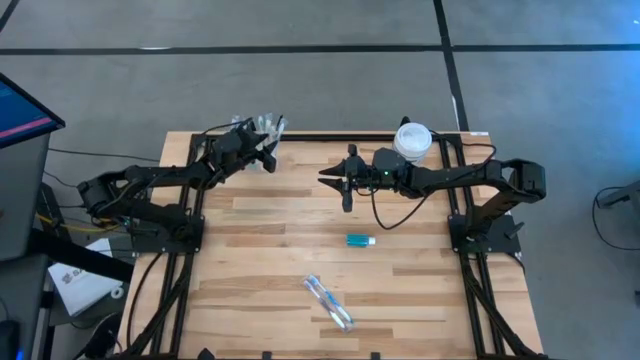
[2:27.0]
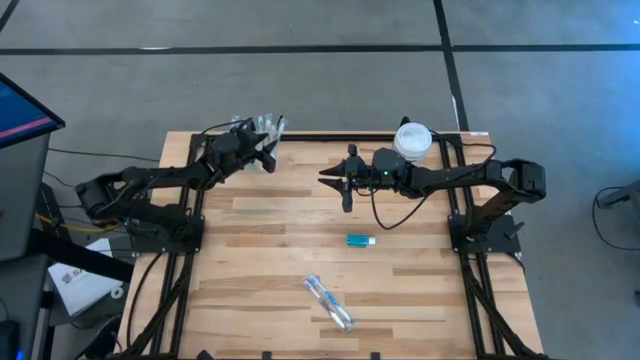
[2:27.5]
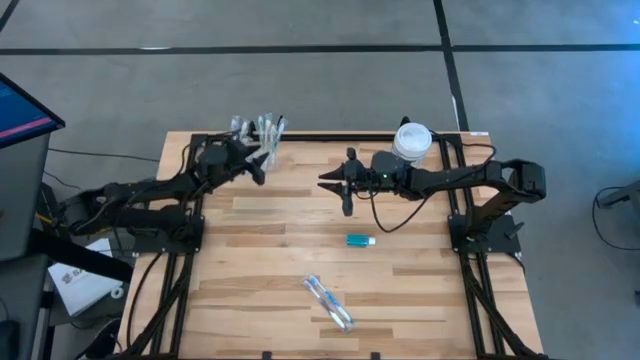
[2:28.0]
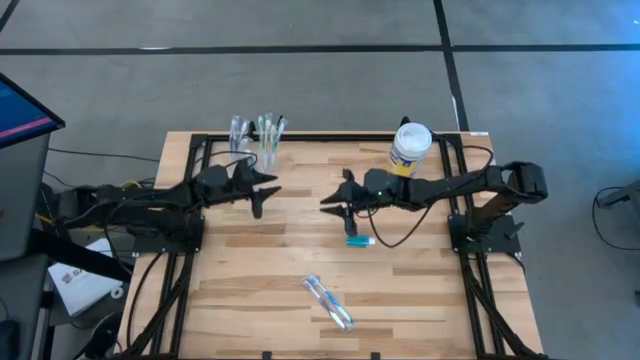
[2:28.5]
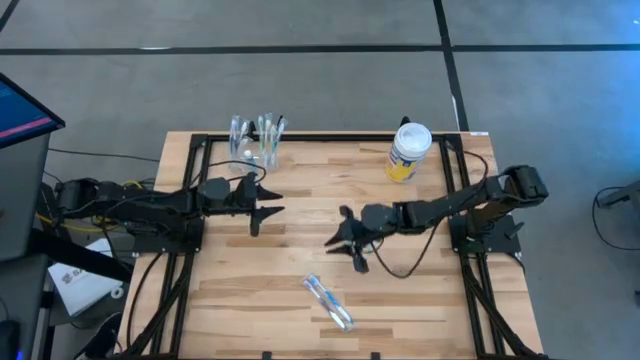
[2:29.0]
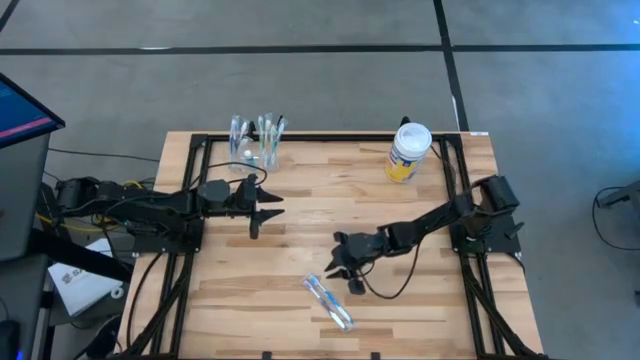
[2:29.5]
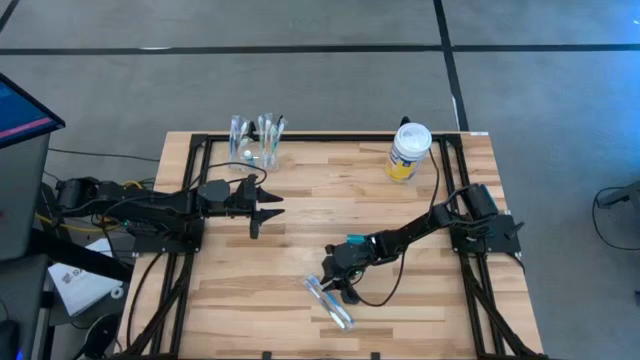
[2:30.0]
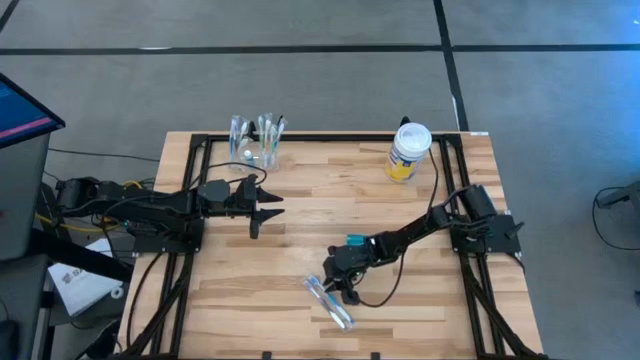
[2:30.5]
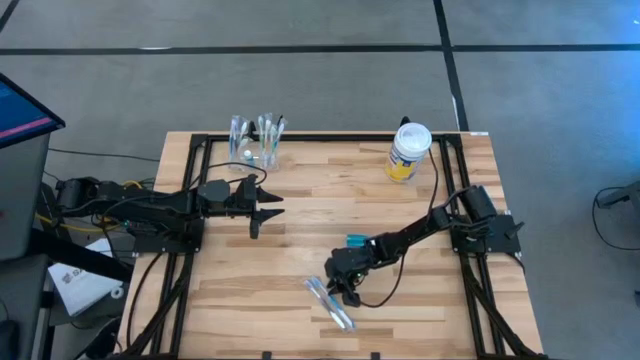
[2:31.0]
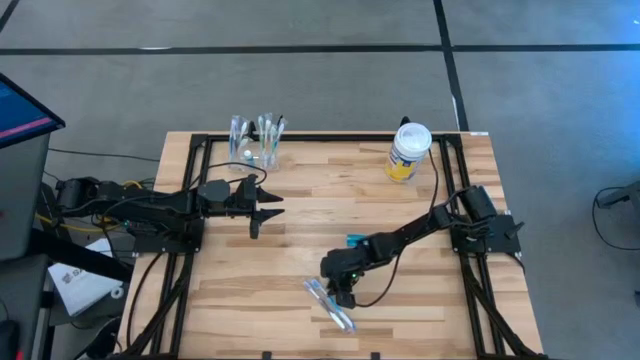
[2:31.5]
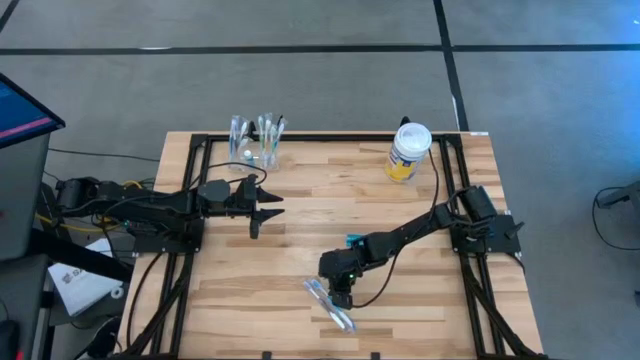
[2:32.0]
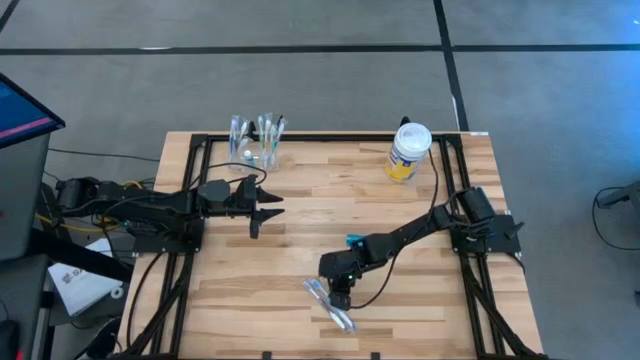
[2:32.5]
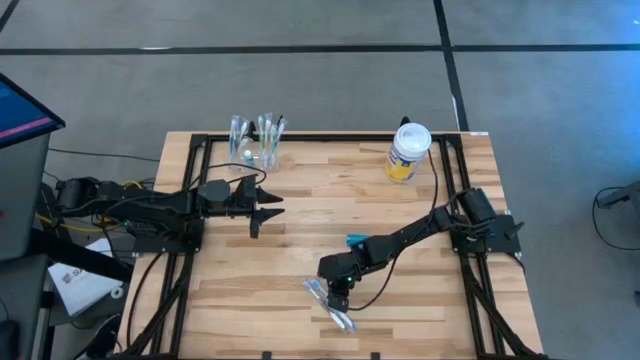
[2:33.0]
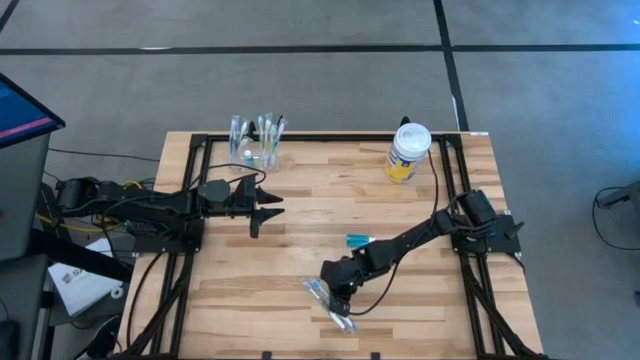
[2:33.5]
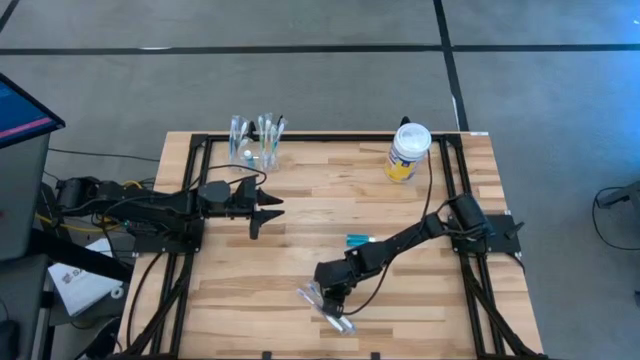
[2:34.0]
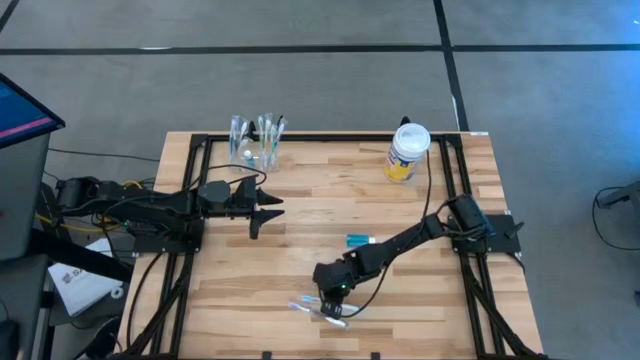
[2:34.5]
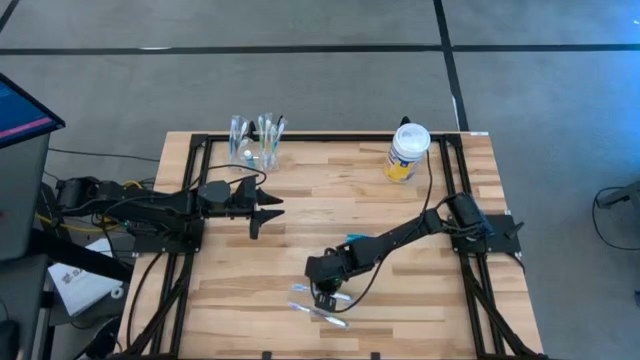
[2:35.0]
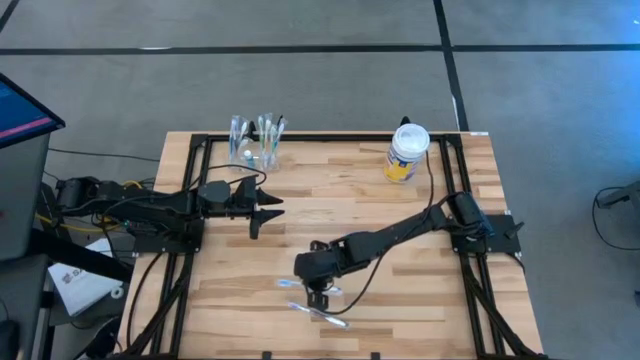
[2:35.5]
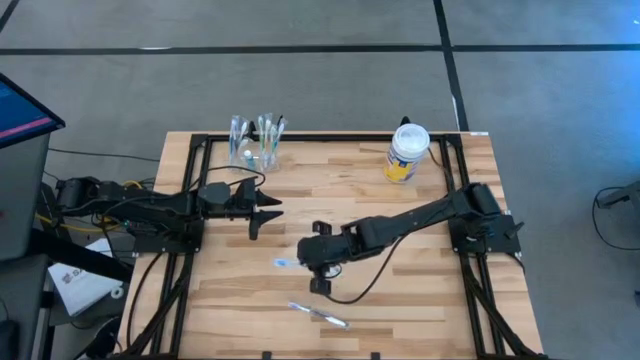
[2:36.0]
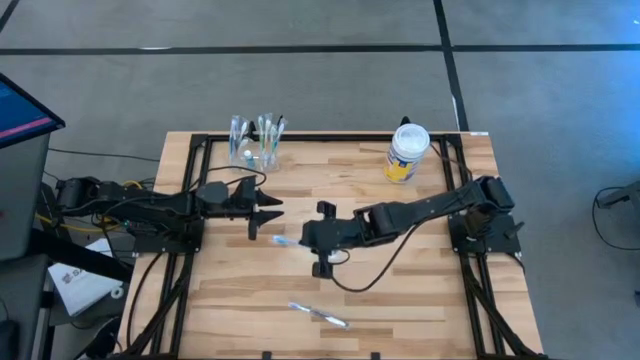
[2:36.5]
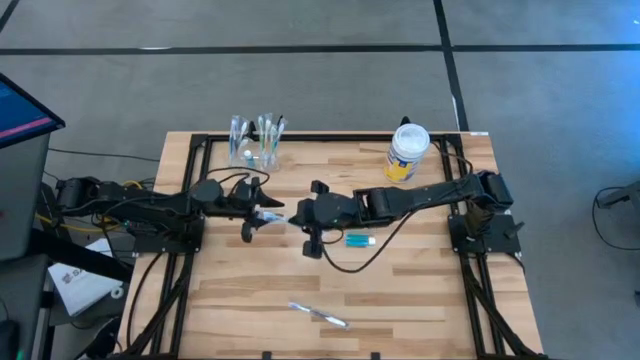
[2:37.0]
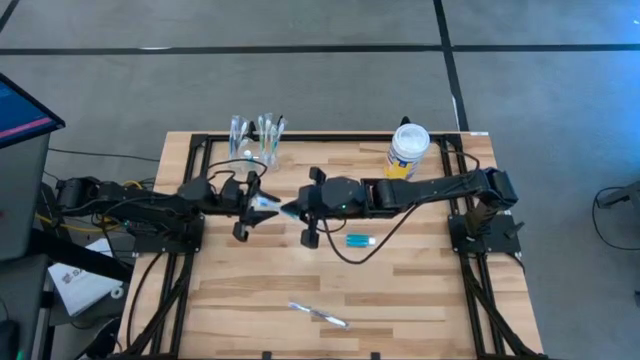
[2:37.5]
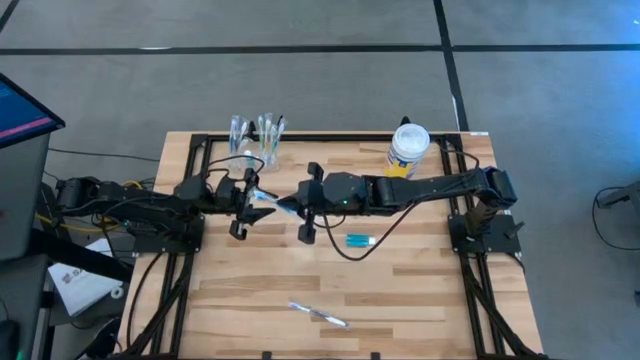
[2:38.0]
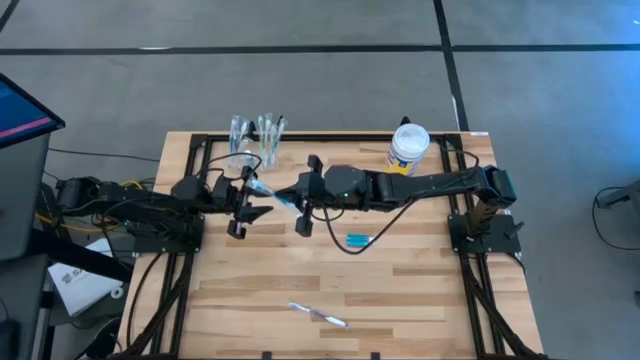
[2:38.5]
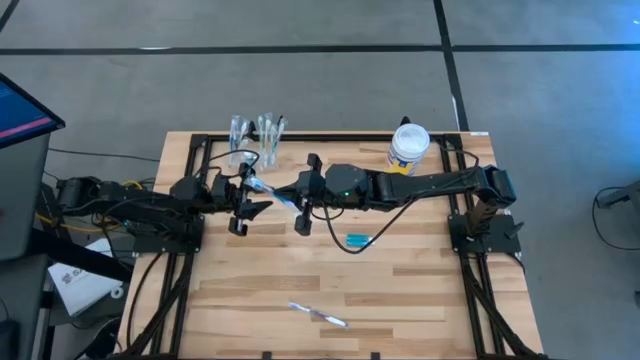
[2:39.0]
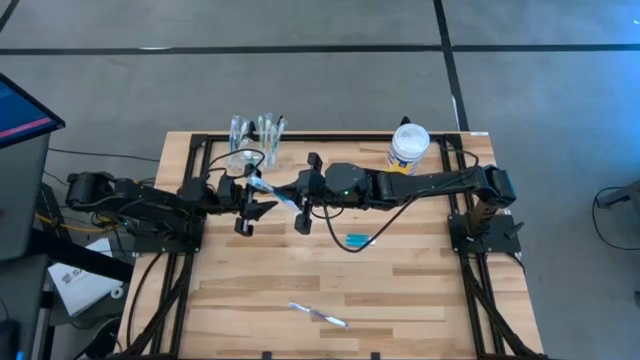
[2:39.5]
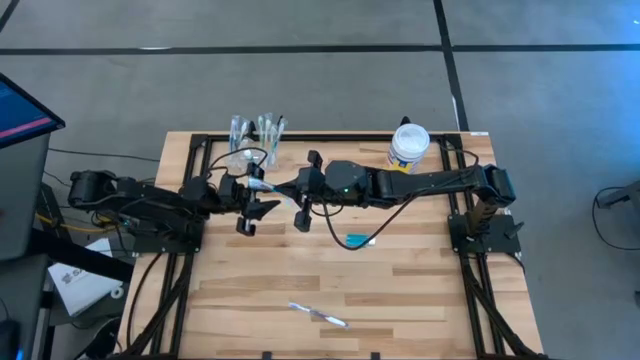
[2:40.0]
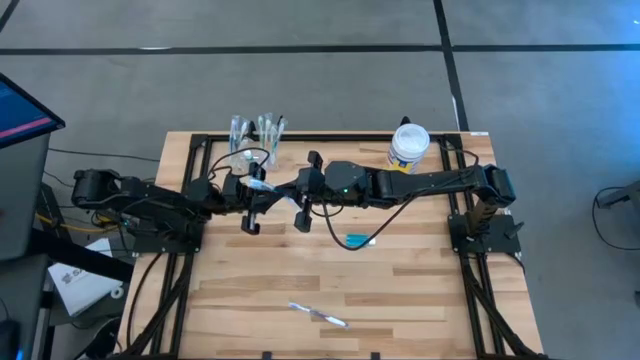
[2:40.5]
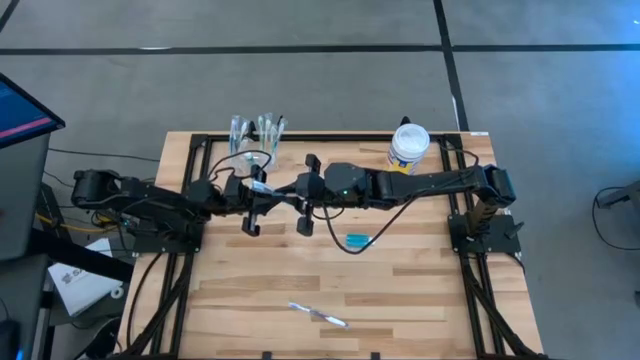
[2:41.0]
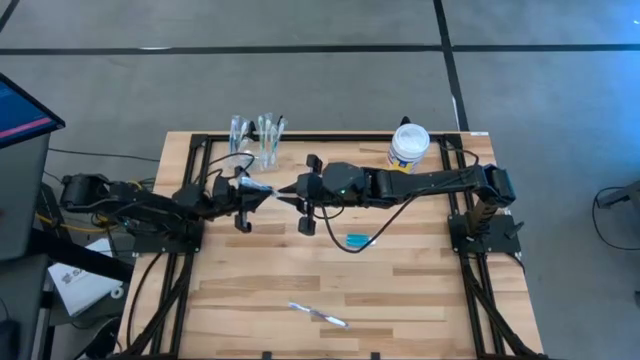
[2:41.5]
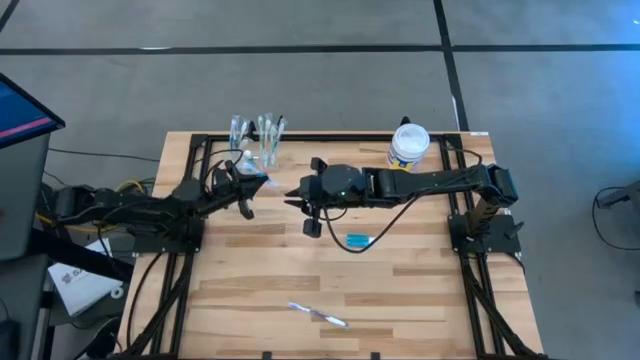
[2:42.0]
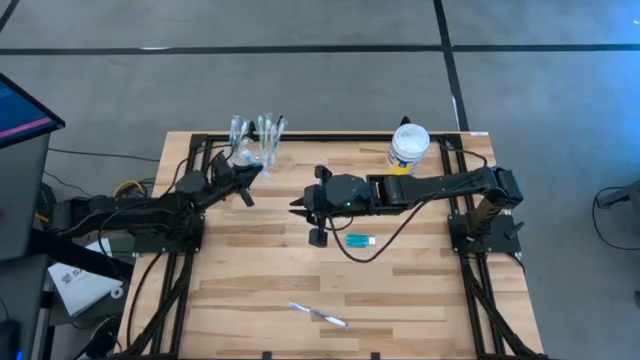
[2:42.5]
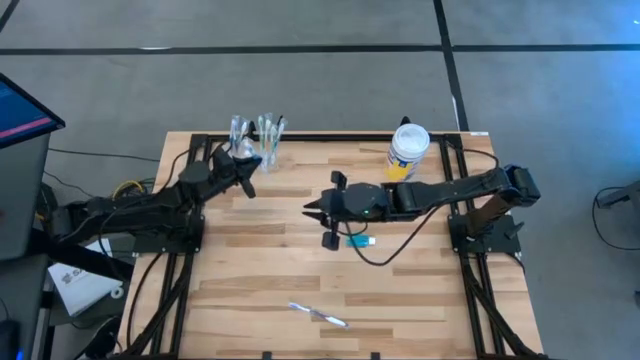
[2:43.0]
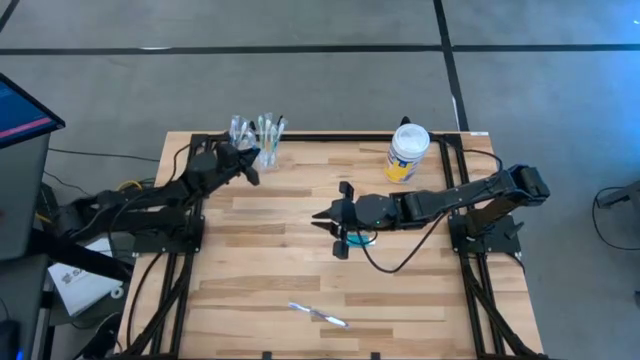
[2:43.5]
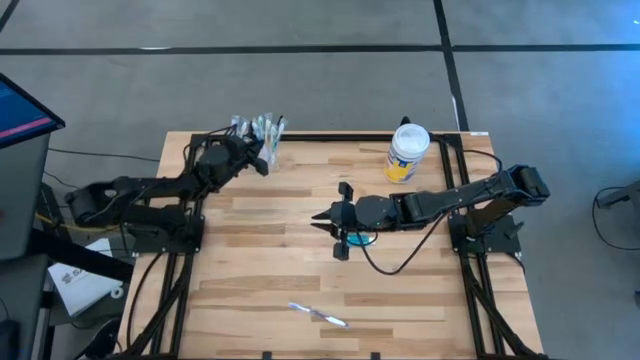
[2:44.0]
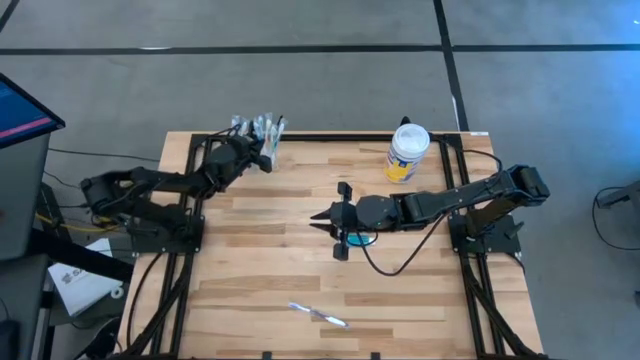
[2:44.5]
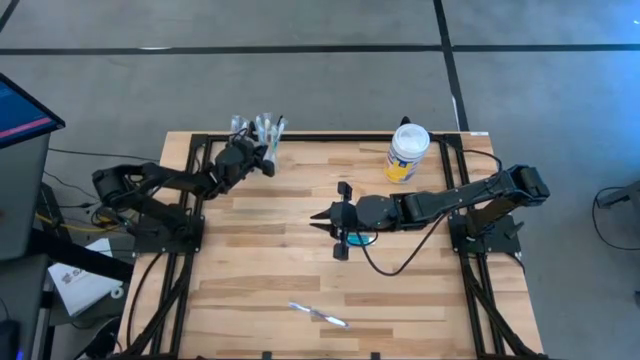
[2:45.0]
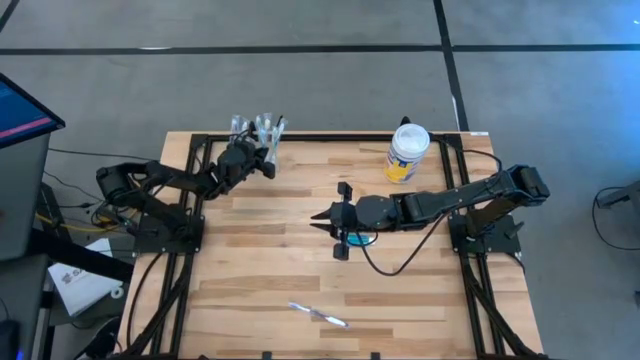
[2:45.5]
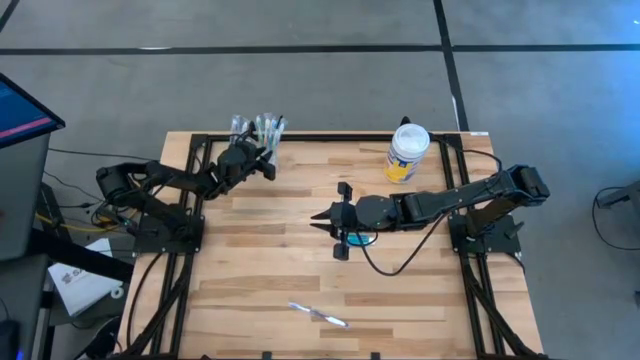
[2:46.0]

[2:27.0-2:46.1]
Task: Pick & Place toothbrushing station
Put the blue toothbrush into the transparent organizer
